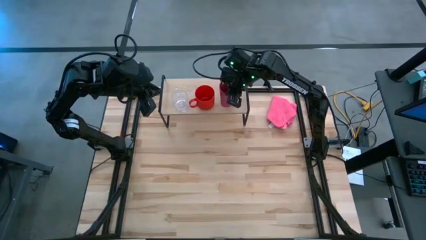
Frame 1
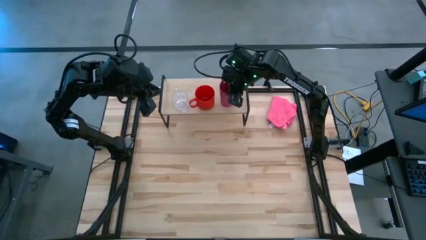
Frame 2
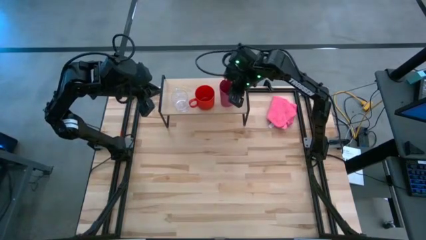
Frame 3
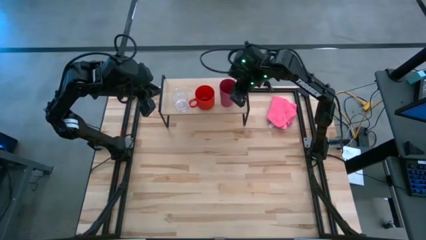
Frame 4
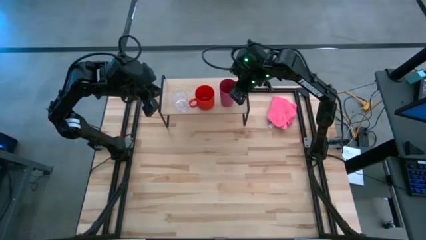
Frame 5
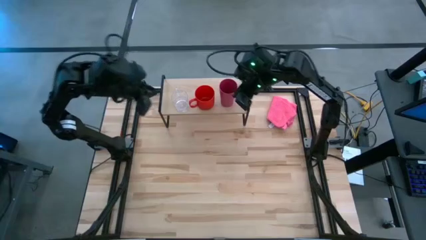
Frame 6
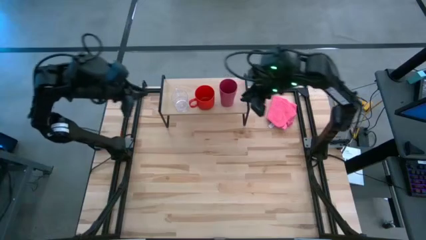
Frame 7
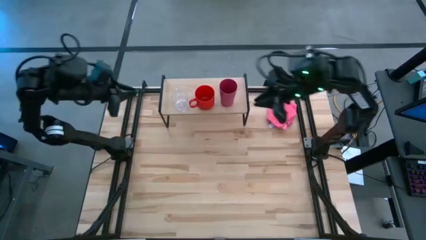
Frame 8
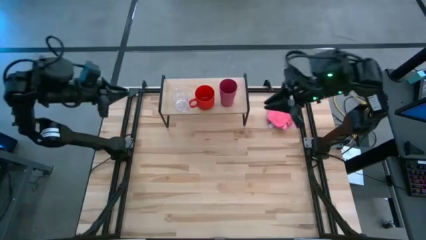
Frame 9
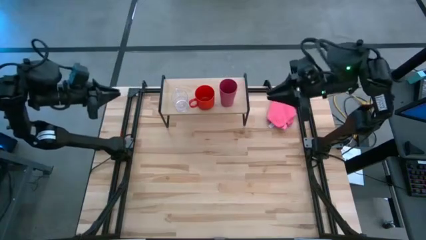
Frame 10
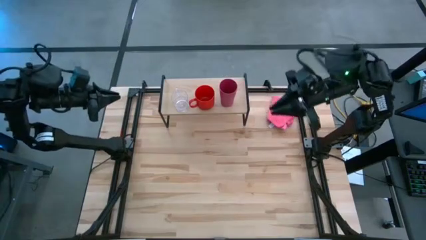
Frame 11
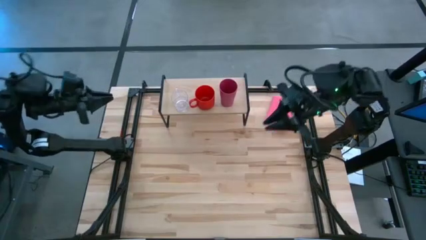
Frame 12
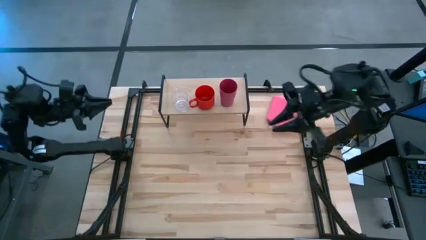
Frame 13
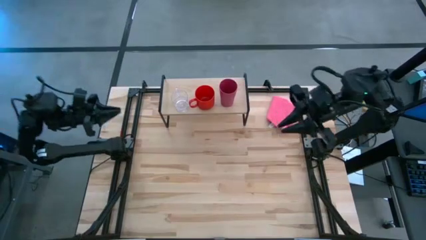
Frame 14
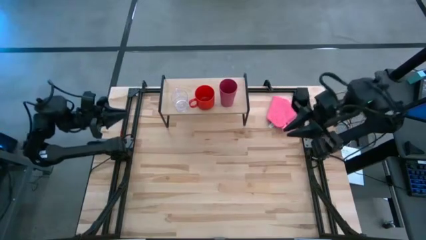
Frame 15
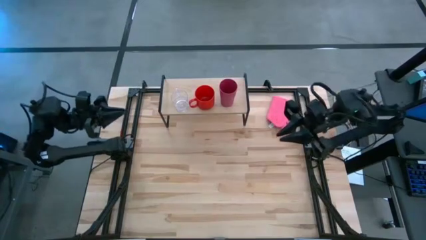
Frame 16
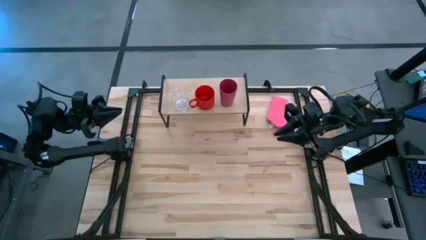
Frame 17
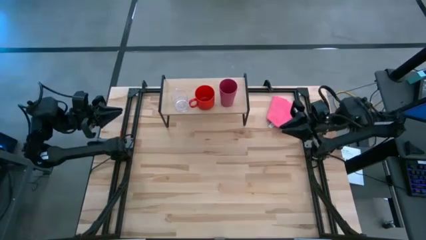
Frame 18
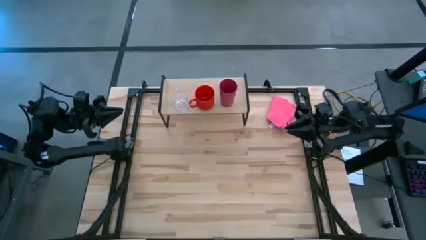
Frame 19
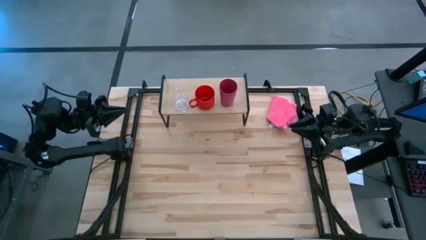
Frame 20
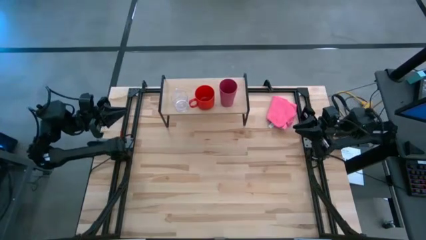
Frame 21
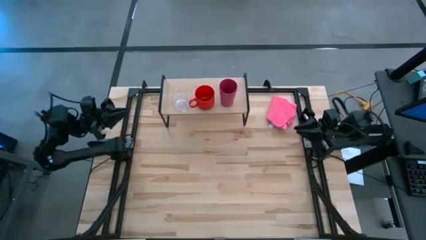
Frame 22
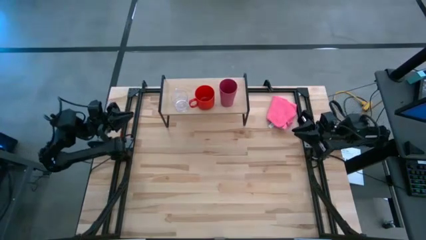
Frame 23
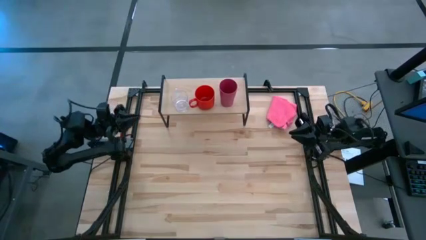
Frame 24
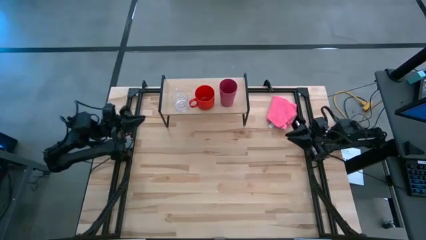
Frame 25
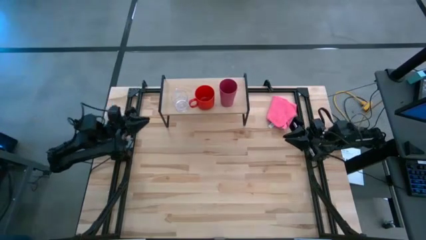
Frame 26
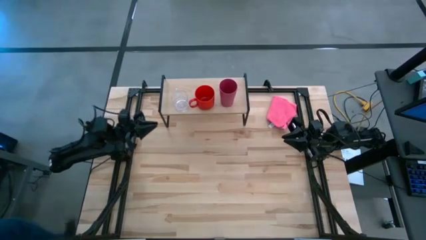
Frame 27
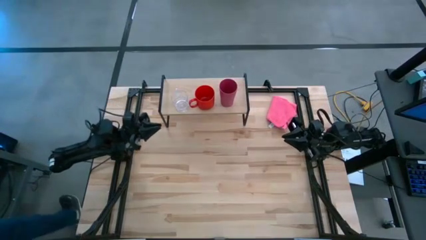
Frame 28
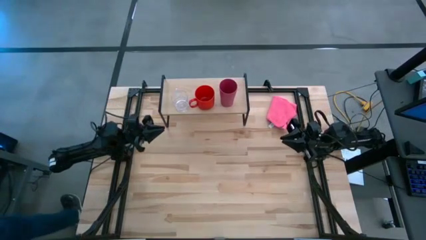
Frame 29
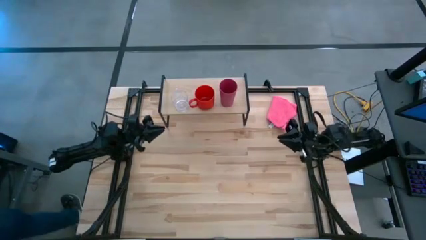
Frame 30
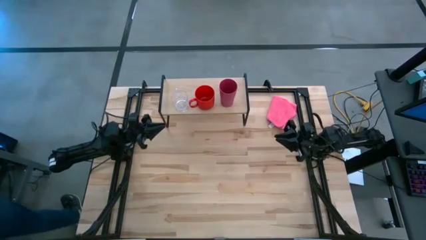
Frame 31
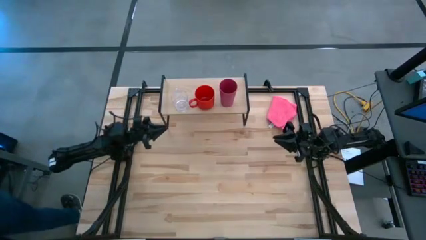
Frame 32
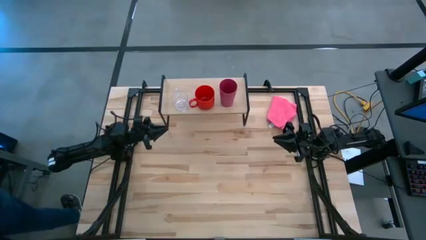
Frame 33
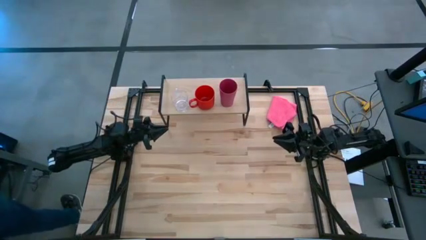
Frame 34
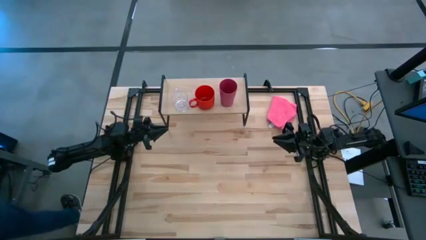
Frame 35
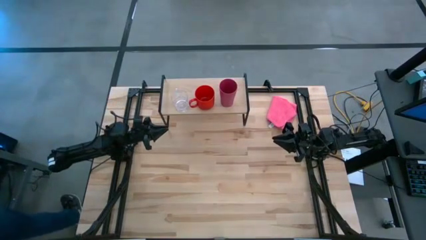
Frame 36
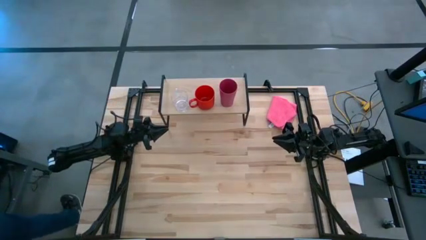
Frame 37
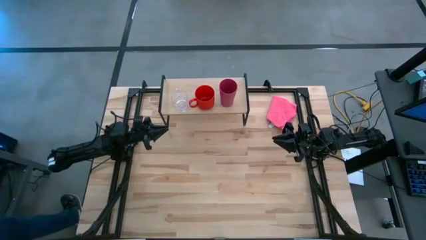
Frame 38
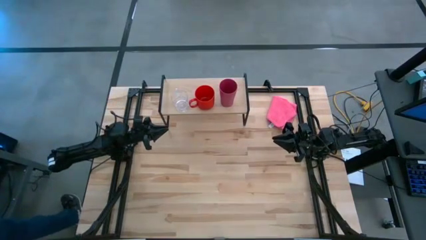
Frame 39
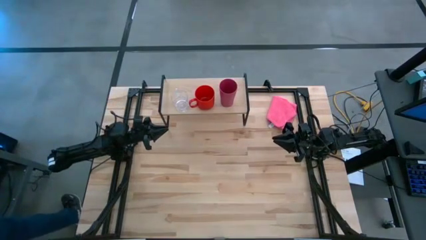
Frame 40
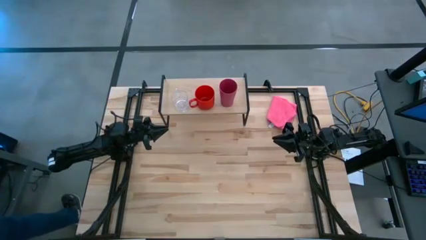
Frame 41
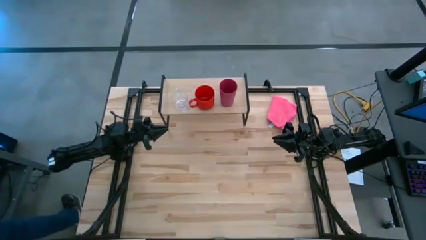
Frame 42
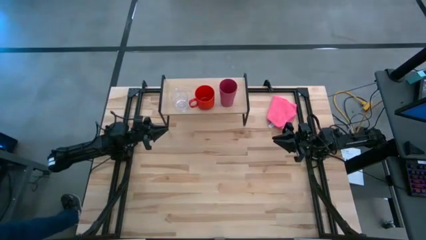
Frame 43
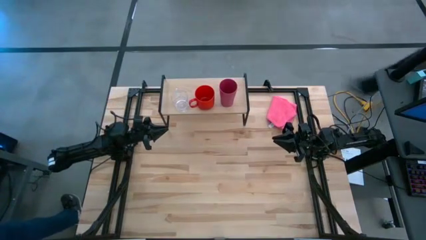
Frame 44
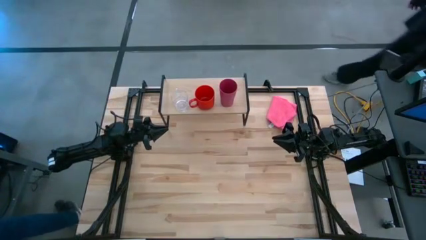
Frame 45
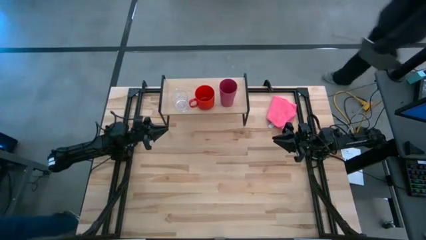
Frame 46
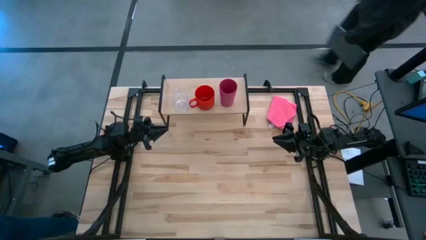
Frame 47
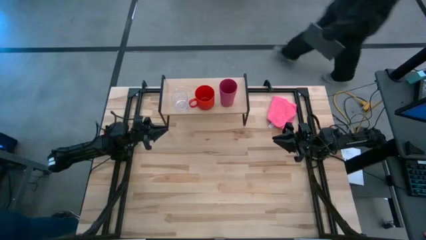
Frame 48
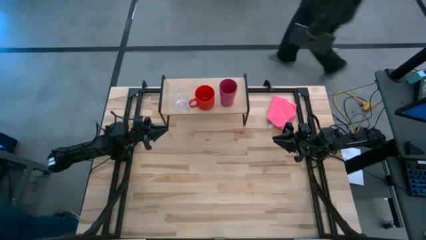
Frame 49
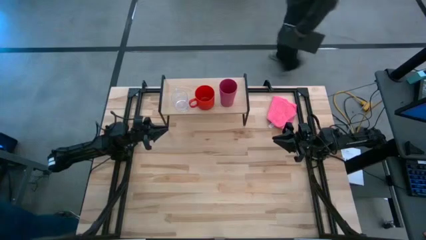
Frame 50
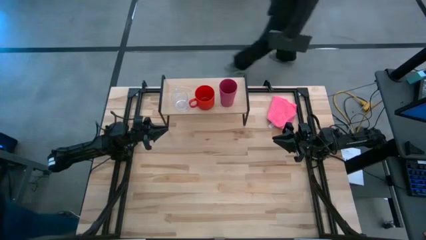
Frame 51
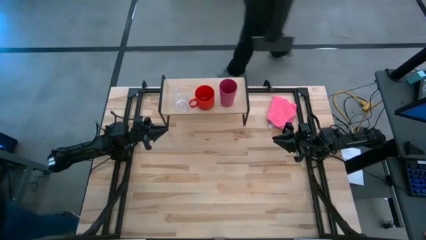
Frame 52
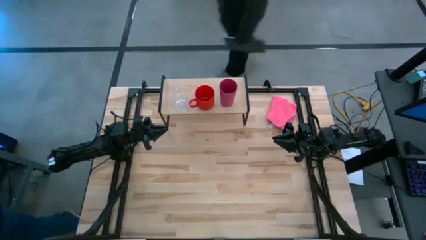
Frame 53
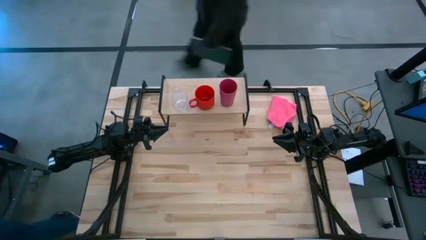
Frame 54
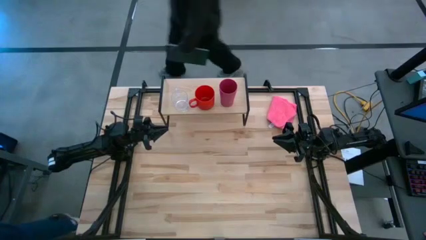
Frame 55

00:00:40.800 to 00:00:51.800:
Task: Stack small to large cups/mugs on shelf
Return to home position
